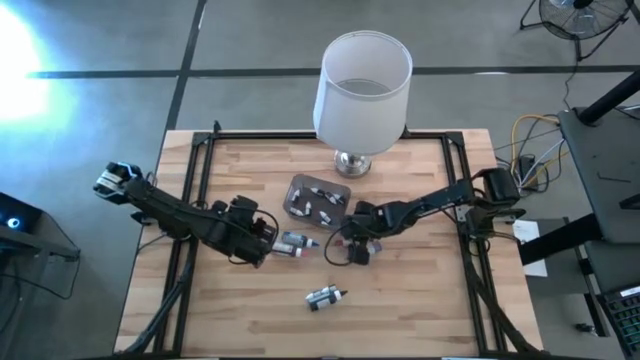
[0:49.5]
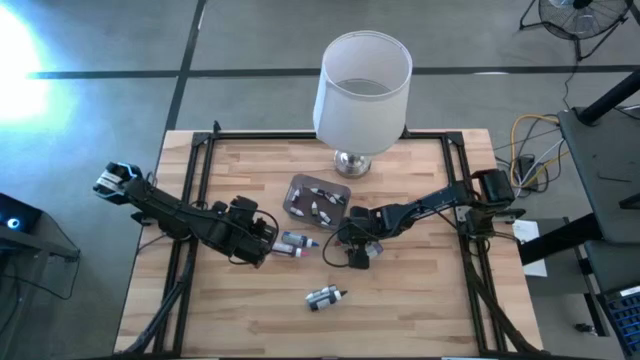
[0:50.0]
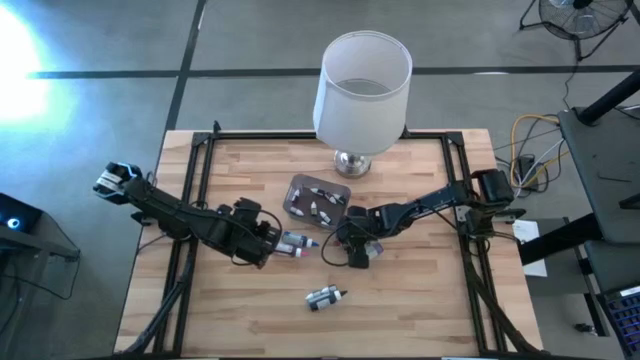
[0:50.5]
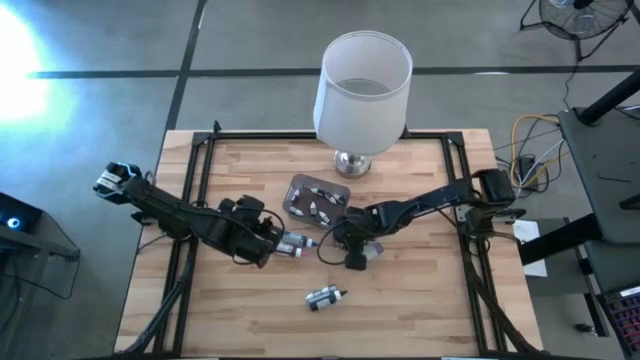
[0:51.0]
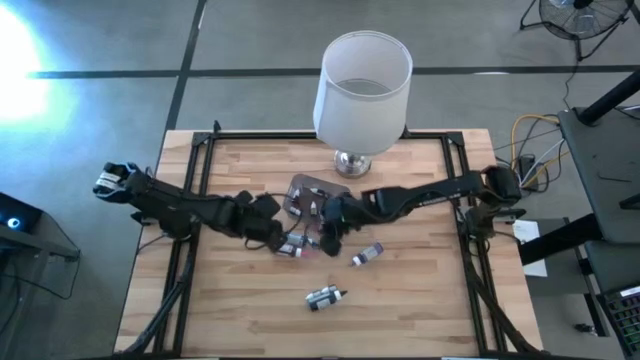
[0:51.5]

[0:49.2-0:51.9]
Task: Pick & Place food coloring
Put the small red food coloring into the black bin

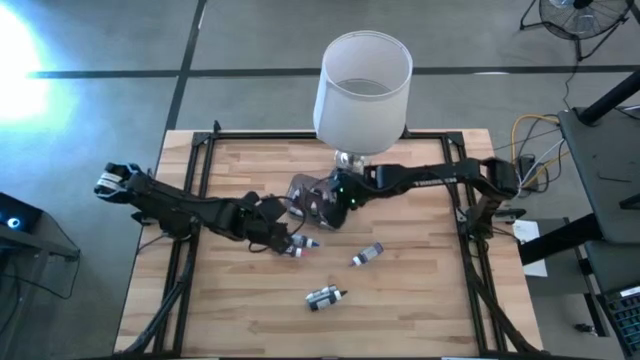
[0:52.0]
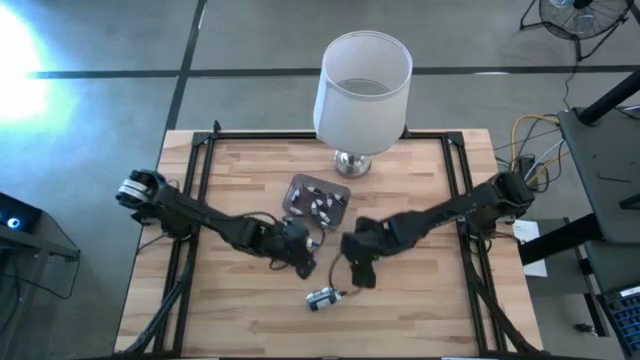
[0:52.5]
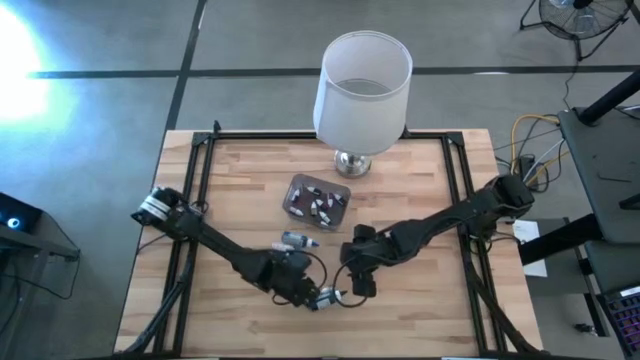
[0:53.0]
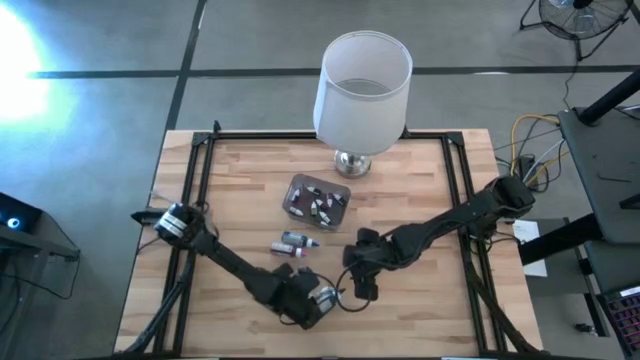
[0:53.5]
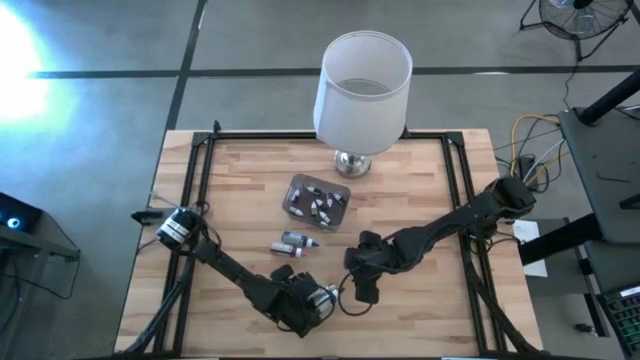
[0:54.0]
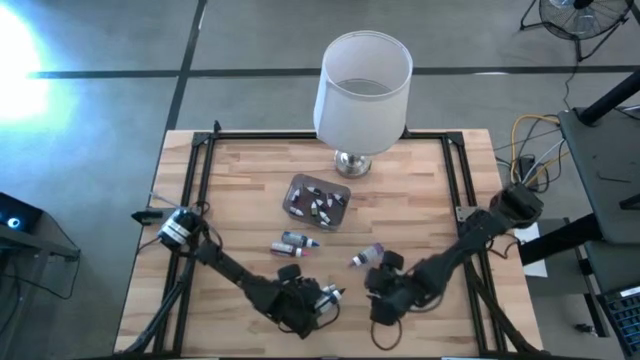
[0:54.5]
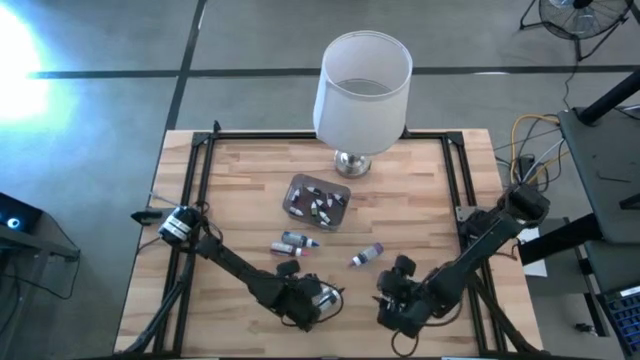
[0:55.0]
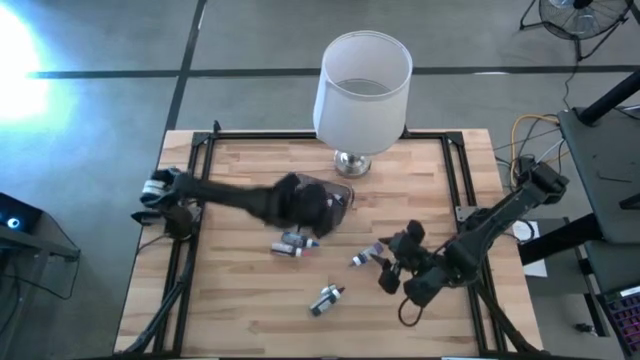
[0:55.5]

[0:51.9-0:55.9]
Put the small dark green food coloring into the black bin

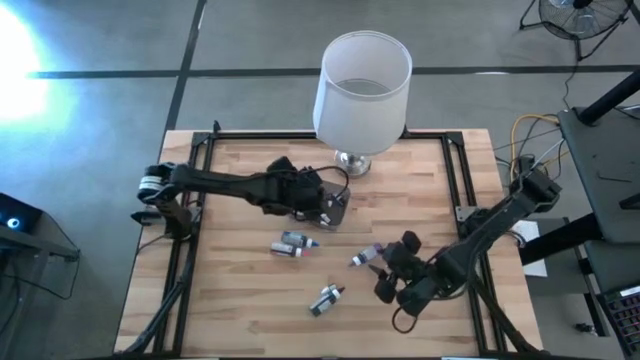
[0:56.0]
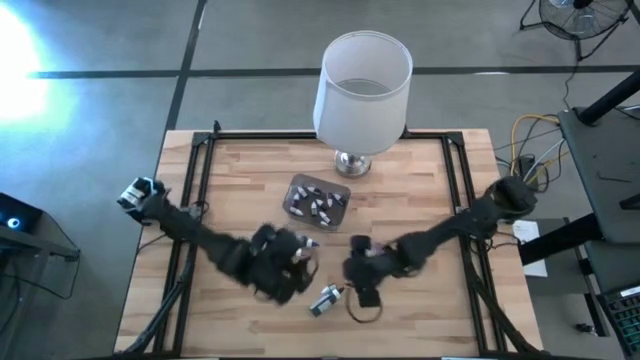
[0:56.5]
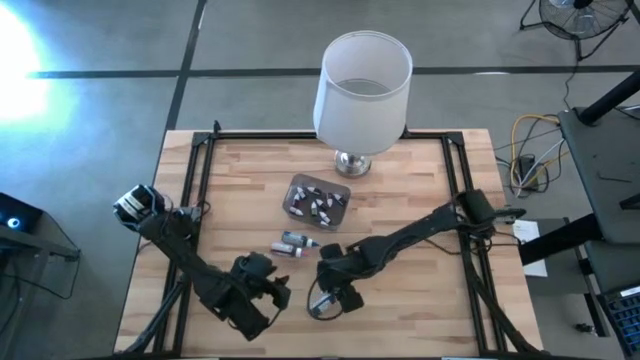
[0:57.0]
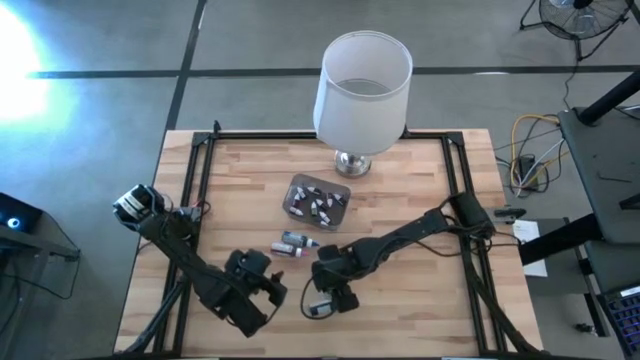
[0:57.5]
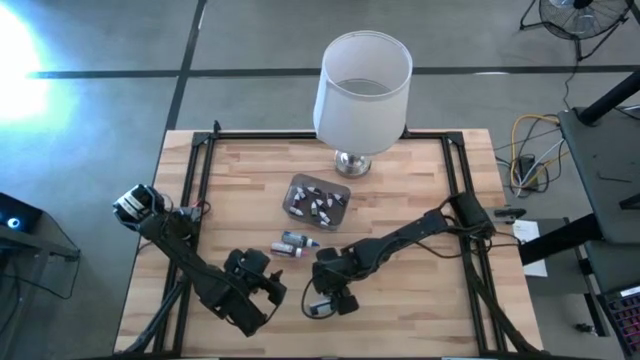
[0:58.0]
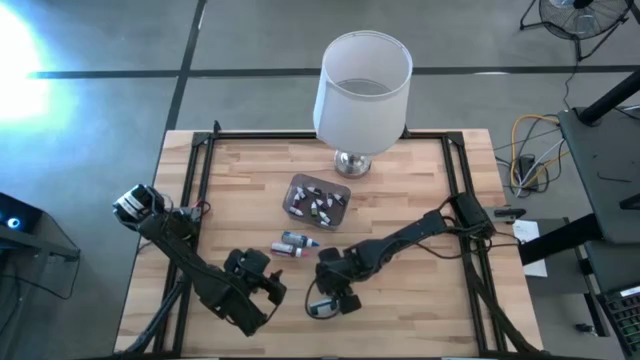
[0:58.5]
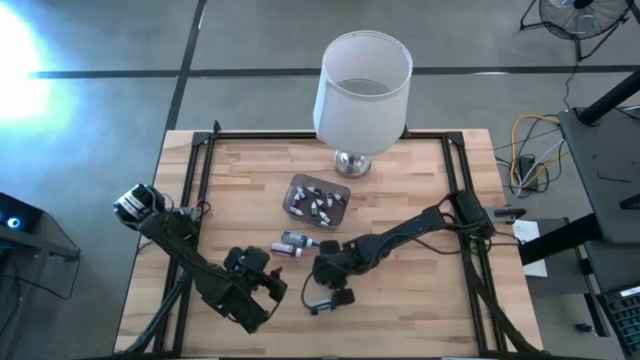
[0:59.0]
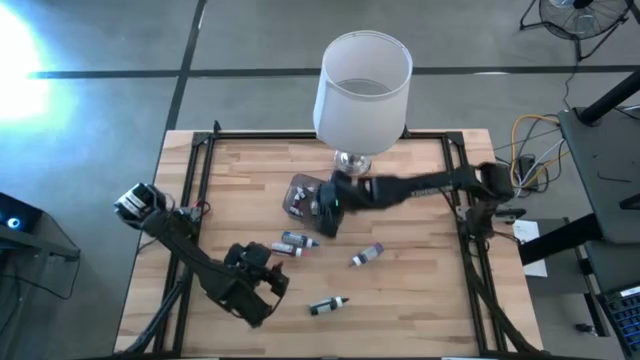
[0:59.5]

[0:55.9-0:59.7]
Put the small dark green food coloring into the black bin

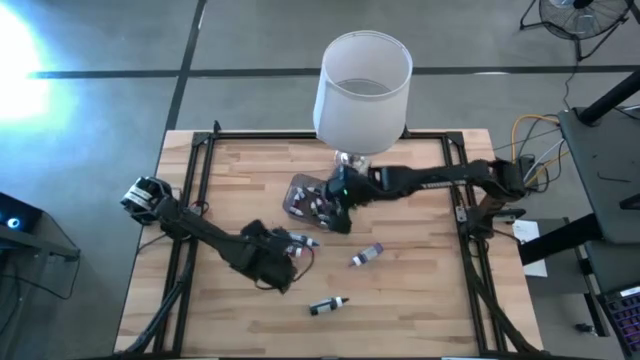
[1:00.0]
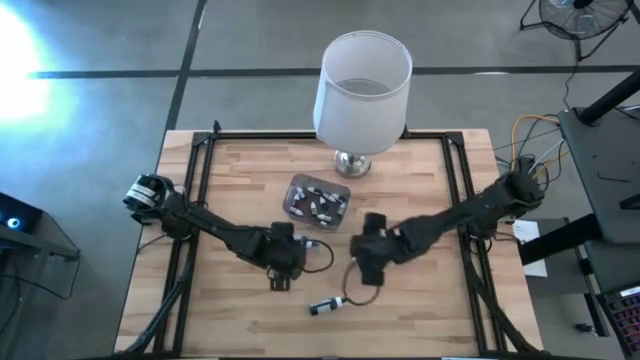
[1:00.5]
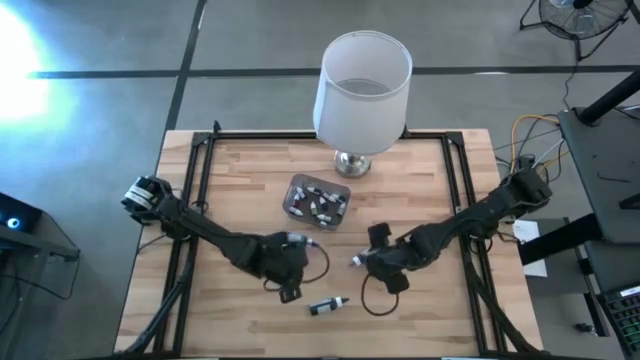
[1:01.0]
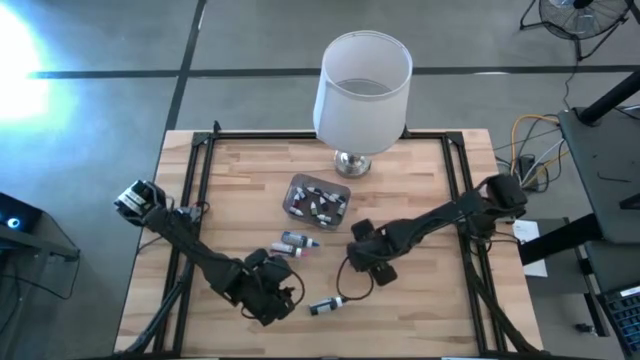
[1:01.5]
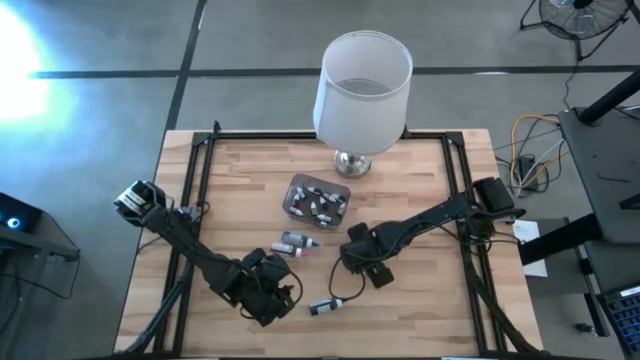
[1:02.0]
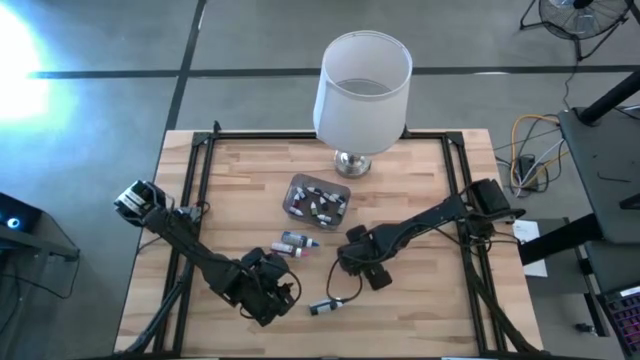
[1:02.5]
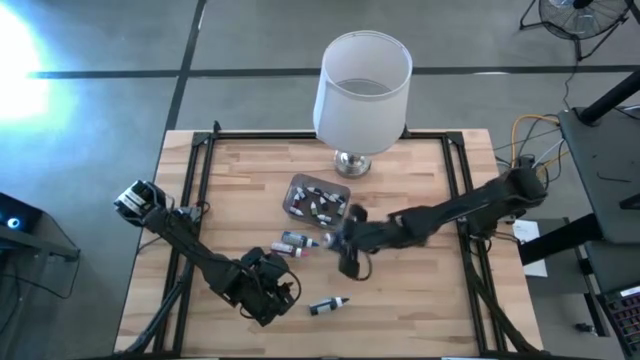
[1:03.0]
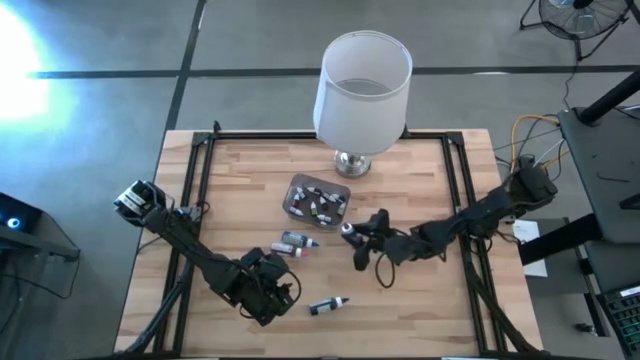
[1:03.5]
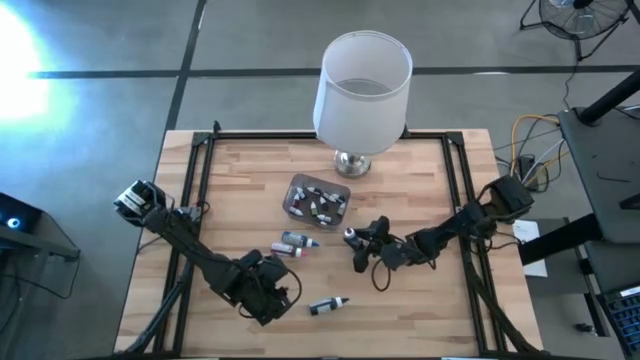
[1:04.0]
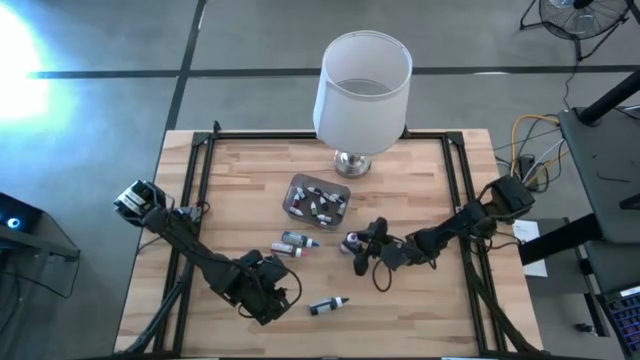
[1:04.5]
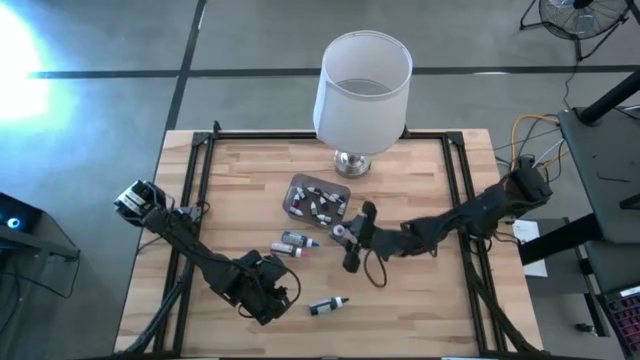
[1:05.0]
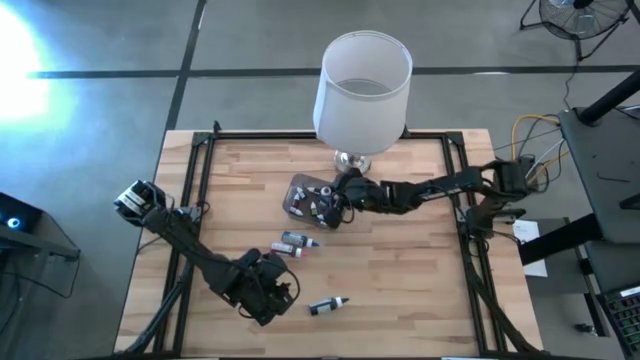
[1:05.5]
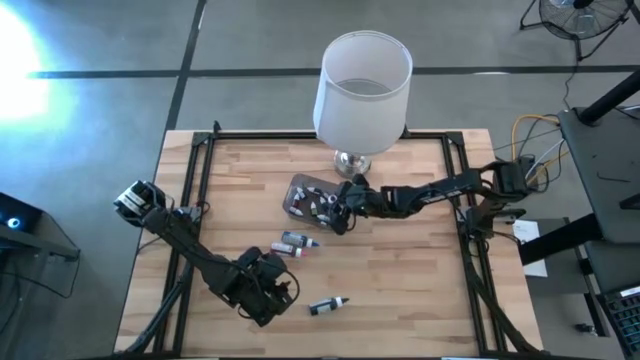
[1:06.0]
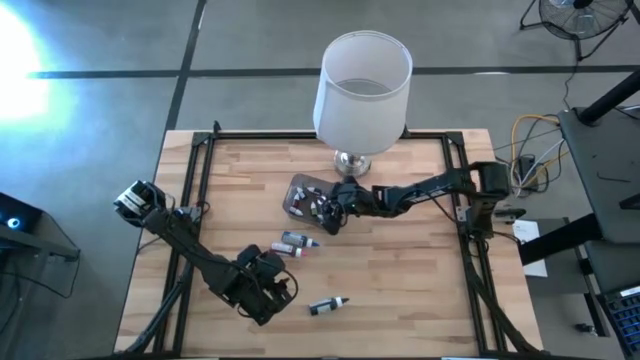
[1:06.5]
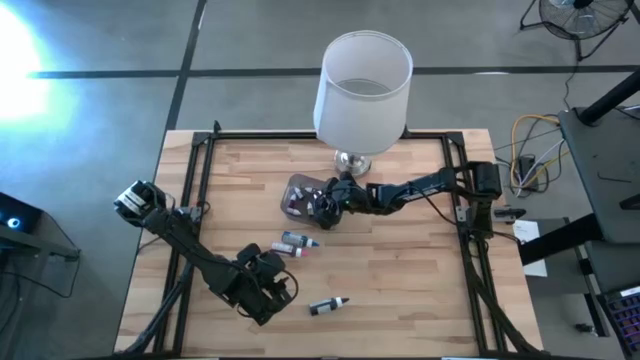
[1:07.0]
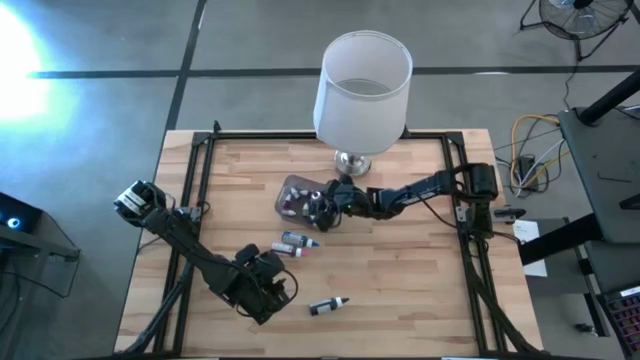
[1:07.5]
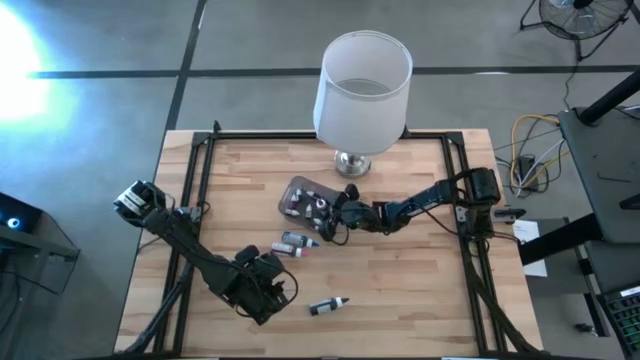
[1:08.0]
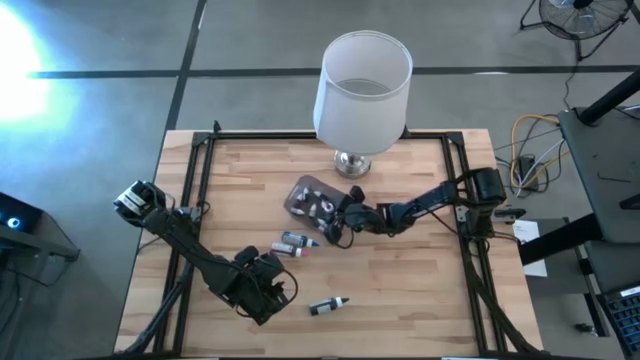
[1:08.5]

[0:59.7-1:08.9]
Put the large violet food coloring into the black bin

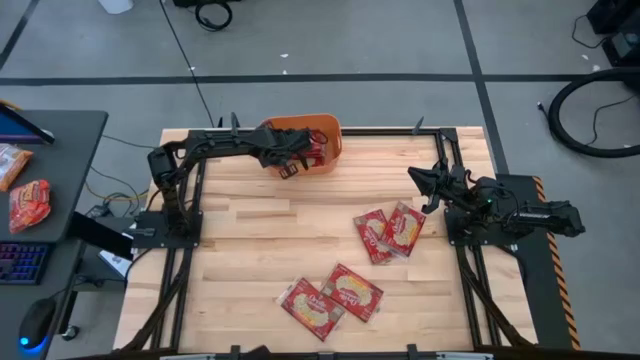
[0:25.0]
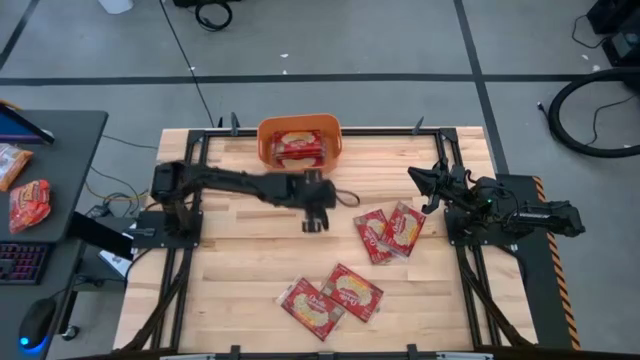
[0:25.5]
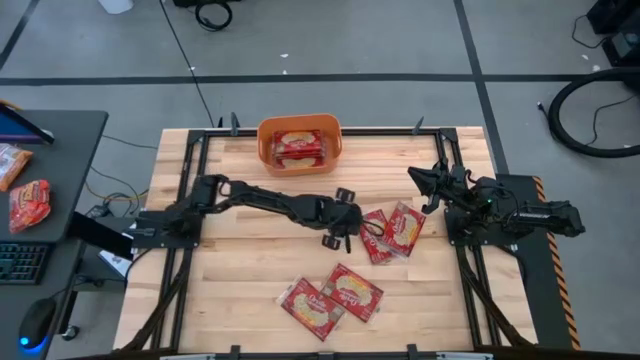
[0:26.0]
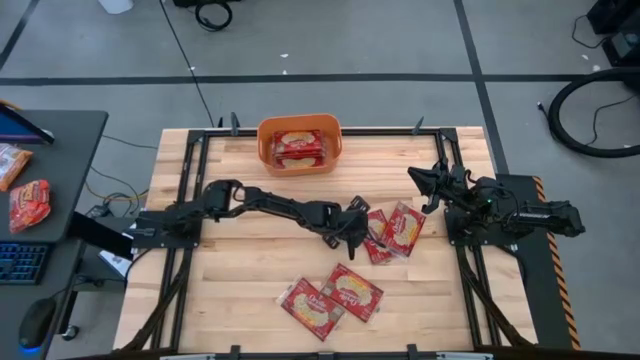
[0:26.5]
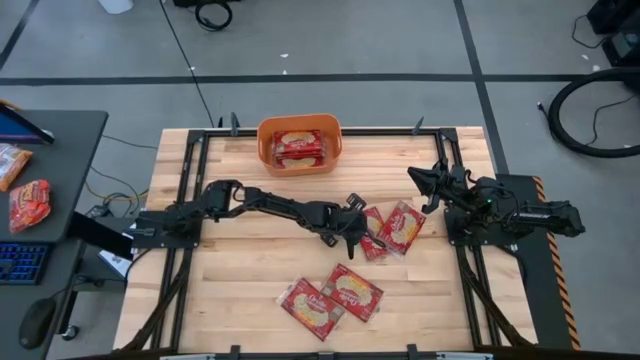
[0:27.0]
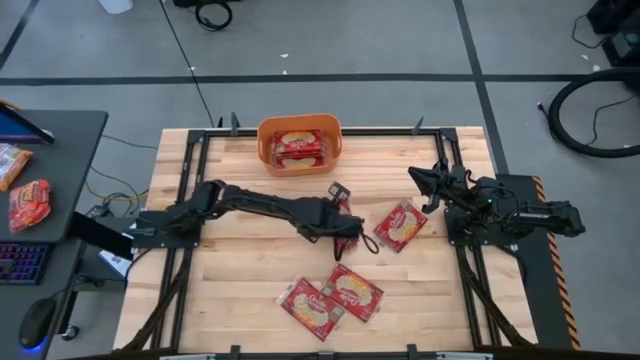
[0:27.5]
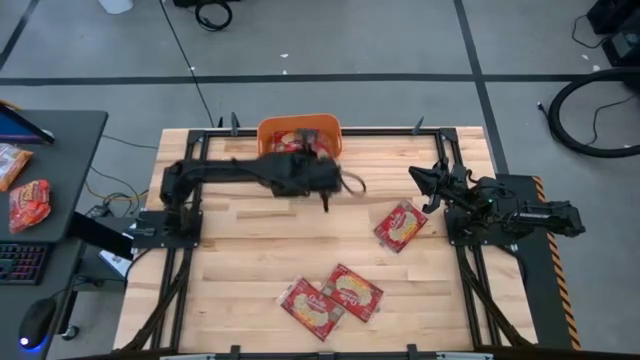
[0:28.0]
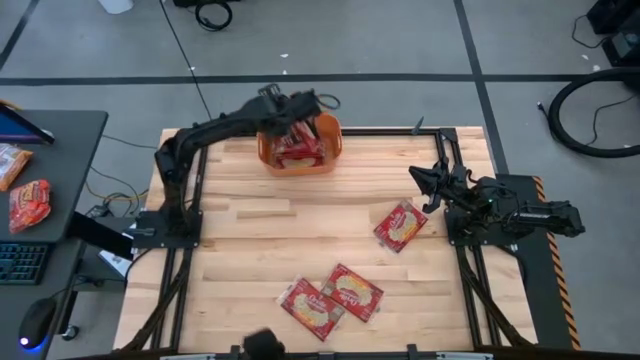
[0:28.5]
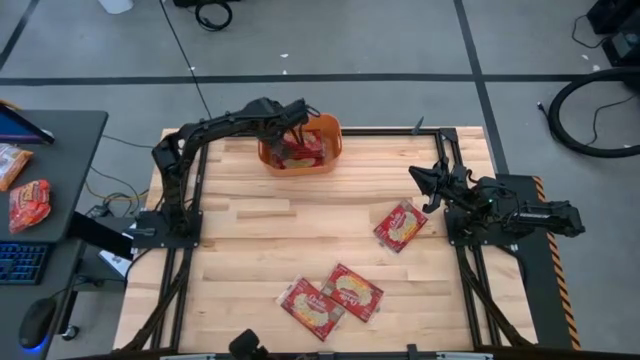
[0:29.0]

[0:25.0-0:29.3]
Task: Sort popcorn bags into baskets
Put the red popcorn bag into the orange bin
